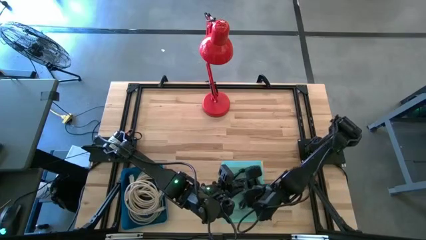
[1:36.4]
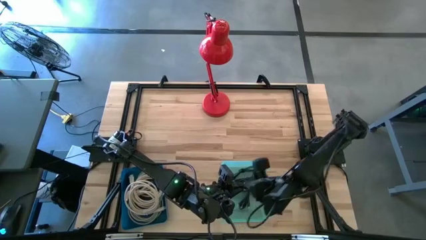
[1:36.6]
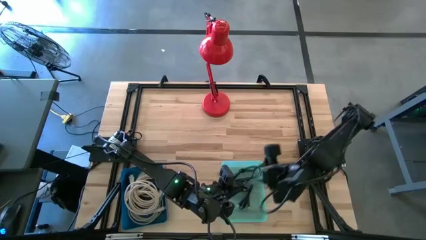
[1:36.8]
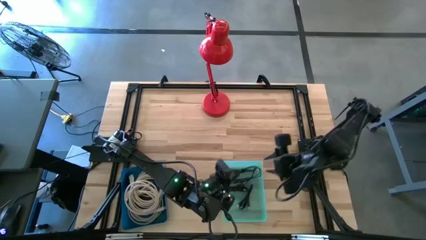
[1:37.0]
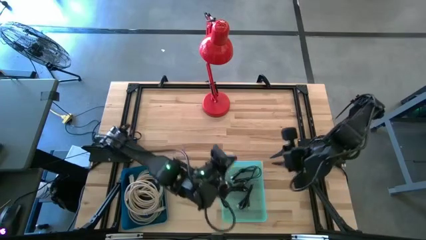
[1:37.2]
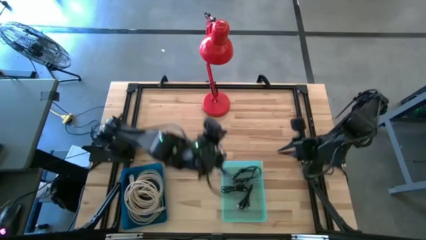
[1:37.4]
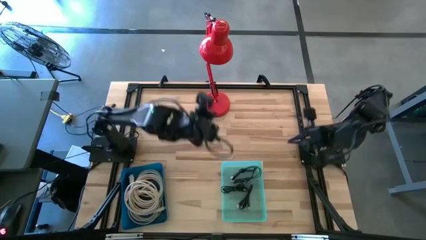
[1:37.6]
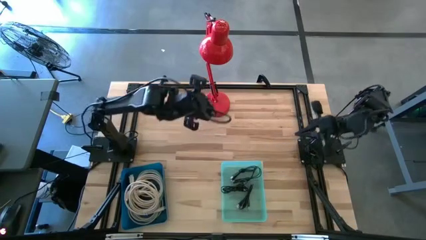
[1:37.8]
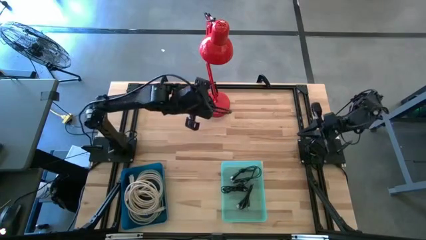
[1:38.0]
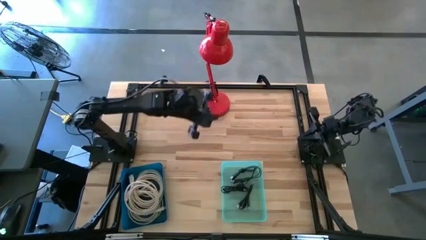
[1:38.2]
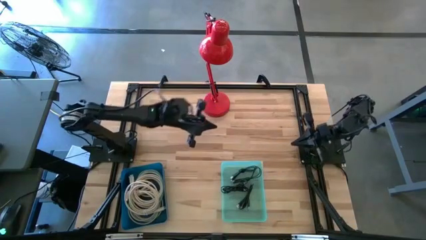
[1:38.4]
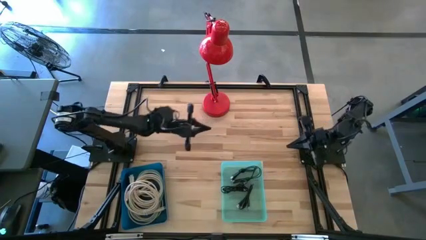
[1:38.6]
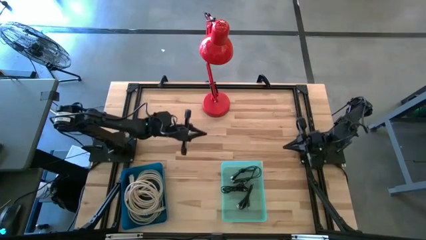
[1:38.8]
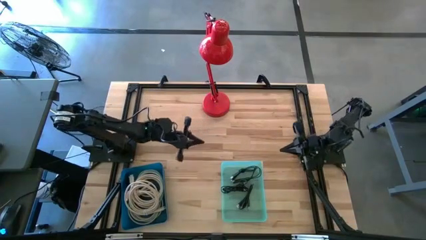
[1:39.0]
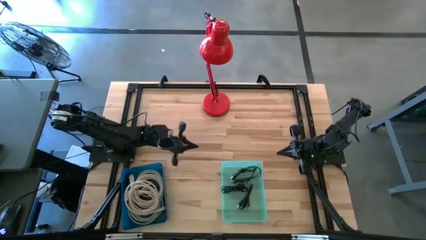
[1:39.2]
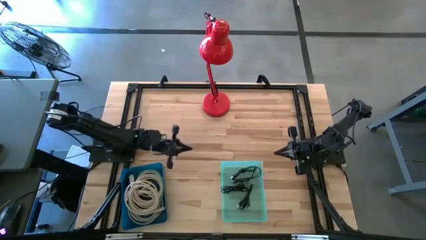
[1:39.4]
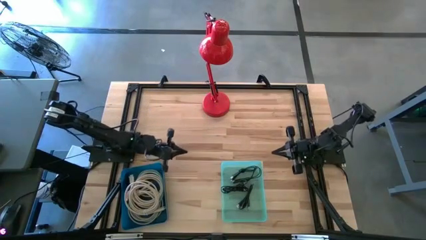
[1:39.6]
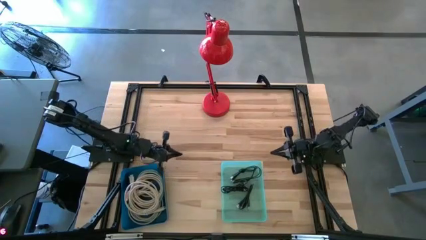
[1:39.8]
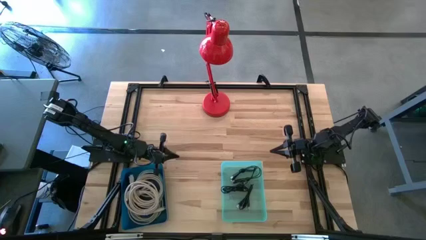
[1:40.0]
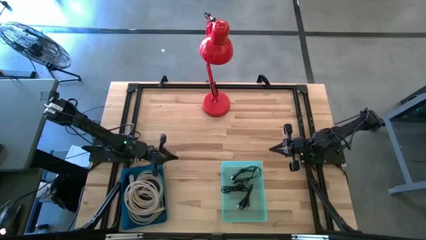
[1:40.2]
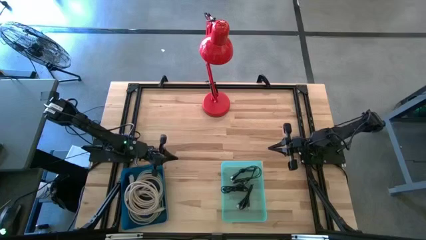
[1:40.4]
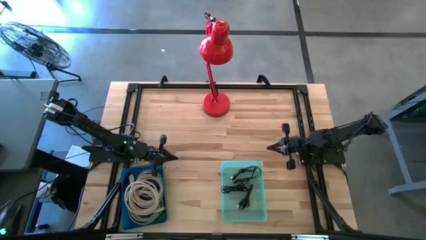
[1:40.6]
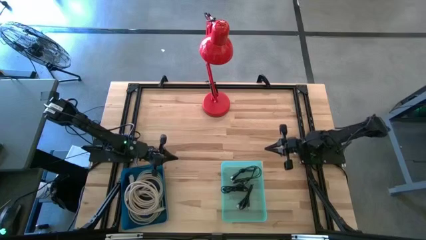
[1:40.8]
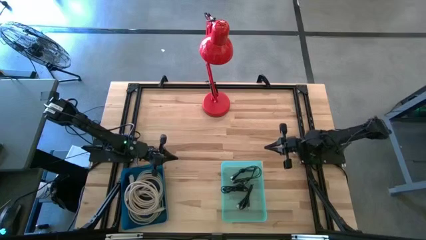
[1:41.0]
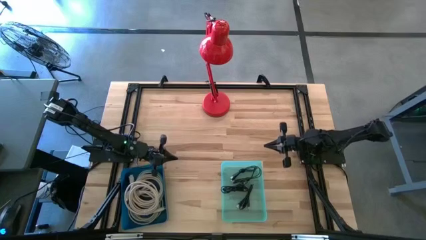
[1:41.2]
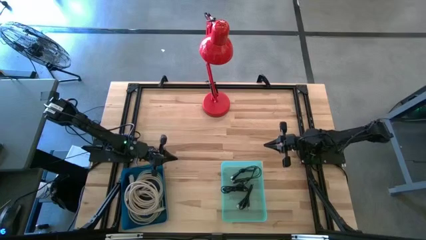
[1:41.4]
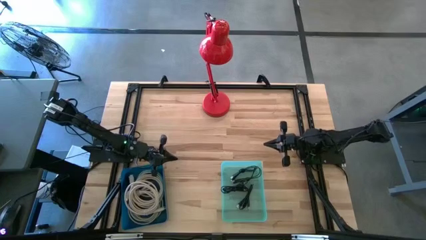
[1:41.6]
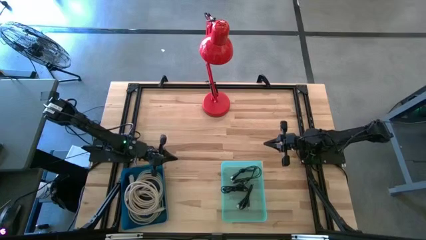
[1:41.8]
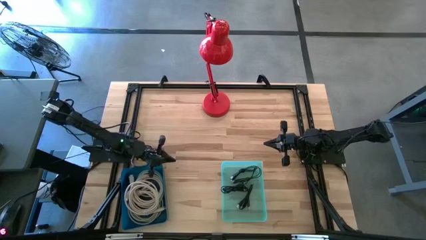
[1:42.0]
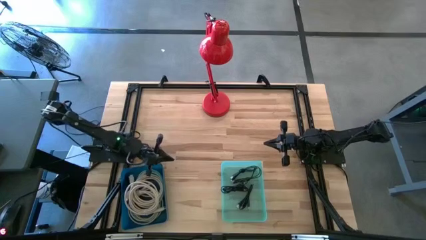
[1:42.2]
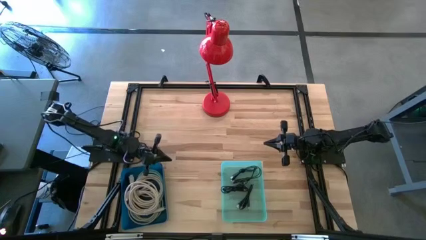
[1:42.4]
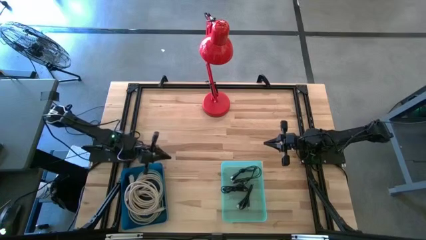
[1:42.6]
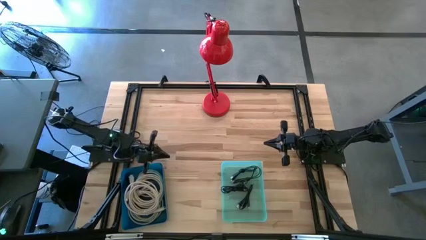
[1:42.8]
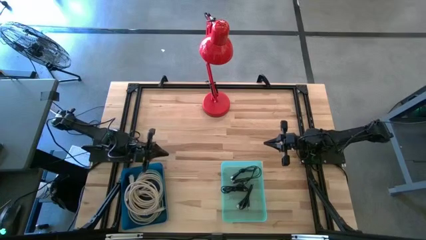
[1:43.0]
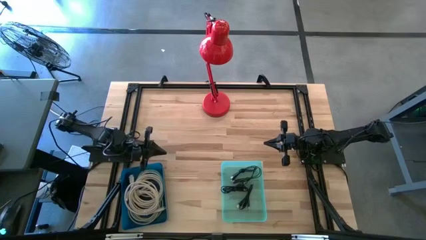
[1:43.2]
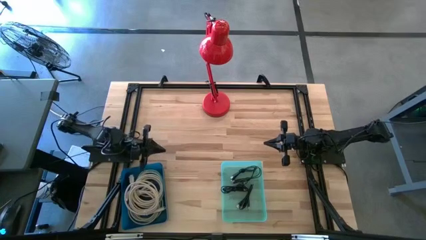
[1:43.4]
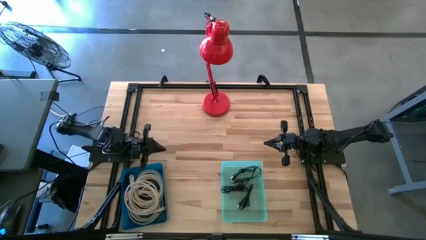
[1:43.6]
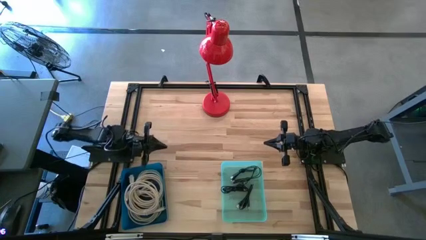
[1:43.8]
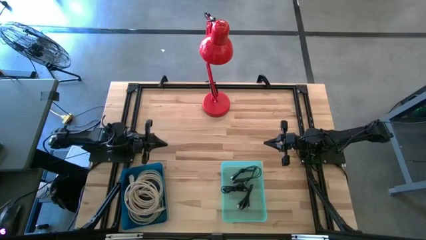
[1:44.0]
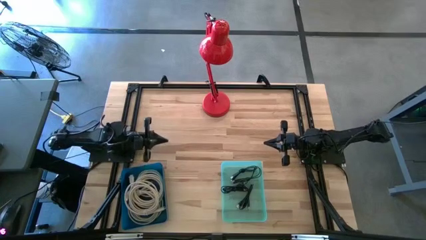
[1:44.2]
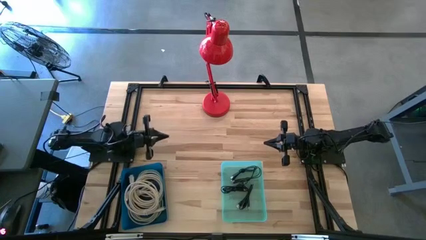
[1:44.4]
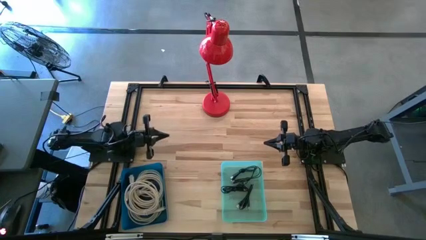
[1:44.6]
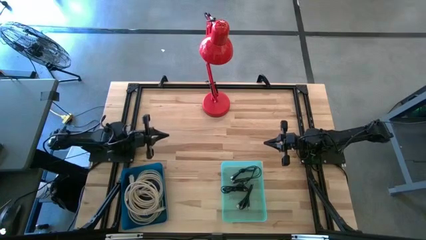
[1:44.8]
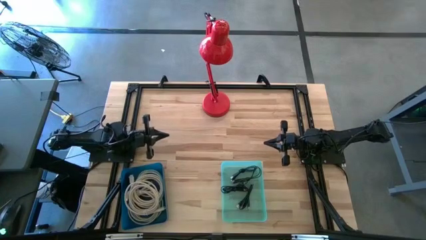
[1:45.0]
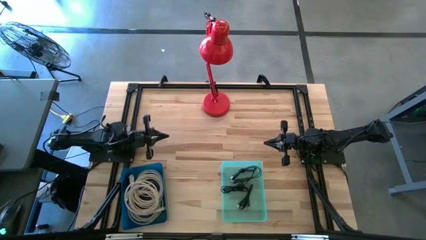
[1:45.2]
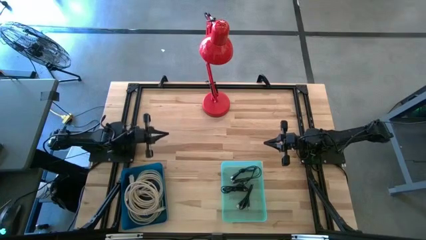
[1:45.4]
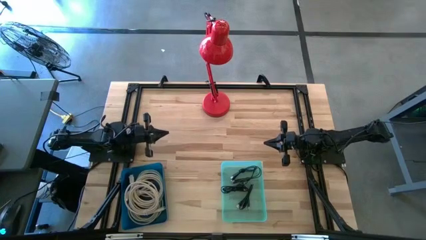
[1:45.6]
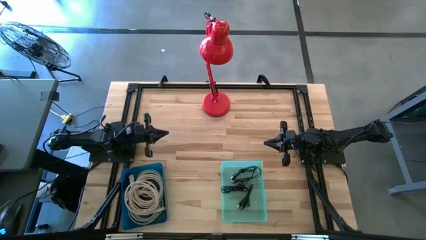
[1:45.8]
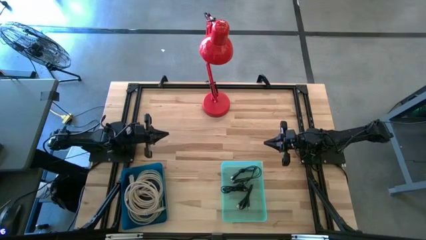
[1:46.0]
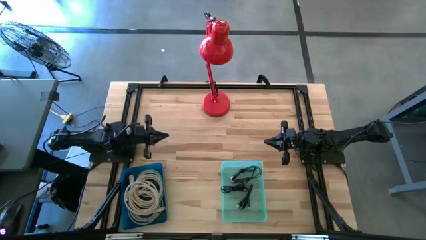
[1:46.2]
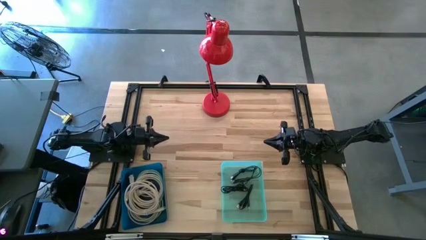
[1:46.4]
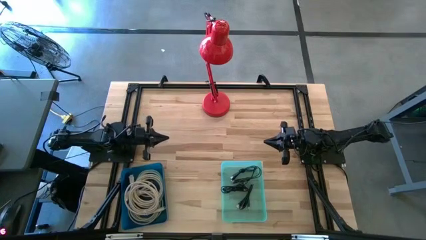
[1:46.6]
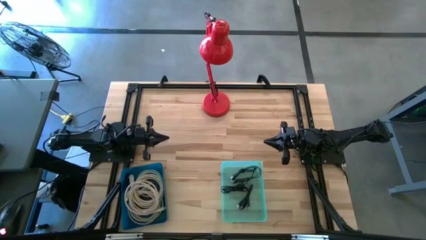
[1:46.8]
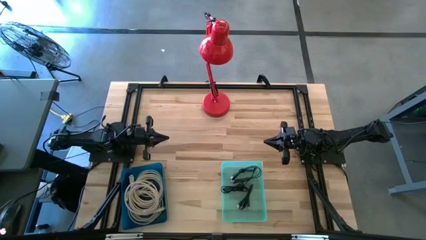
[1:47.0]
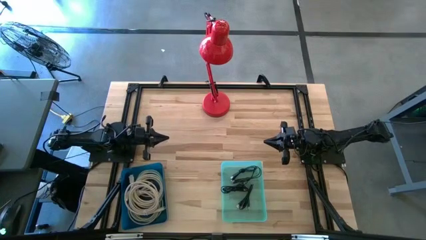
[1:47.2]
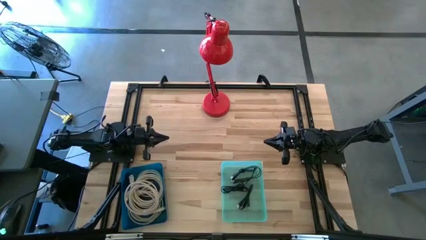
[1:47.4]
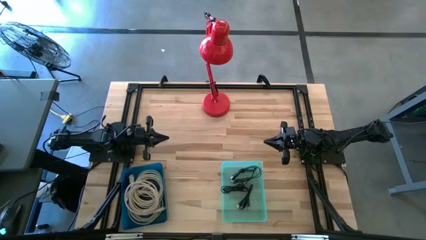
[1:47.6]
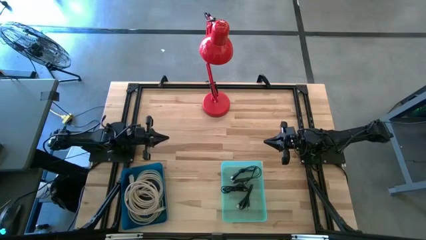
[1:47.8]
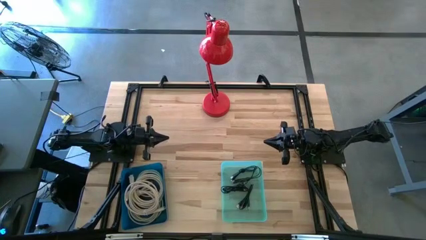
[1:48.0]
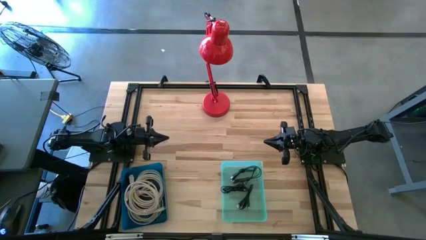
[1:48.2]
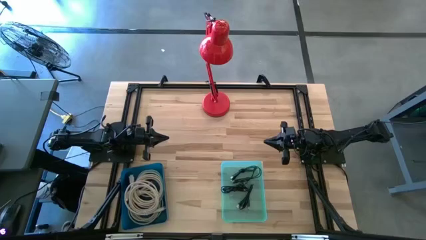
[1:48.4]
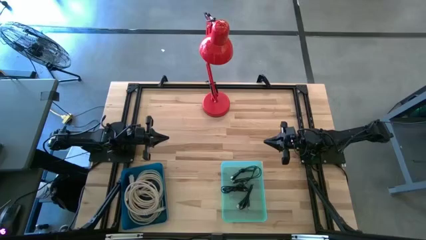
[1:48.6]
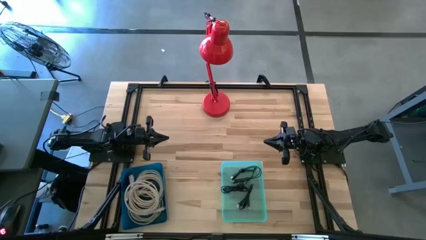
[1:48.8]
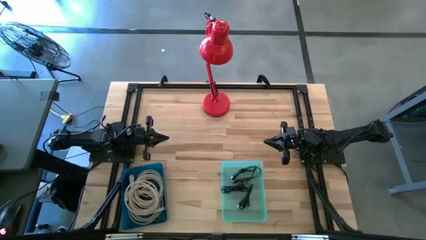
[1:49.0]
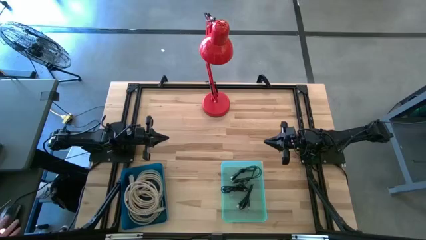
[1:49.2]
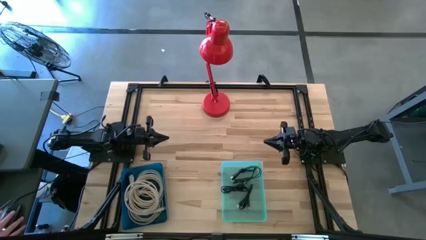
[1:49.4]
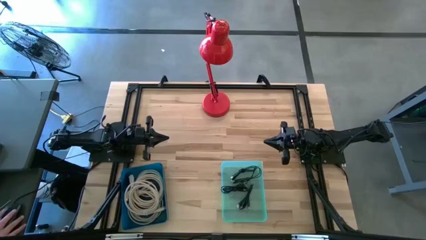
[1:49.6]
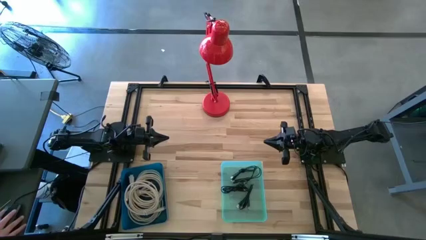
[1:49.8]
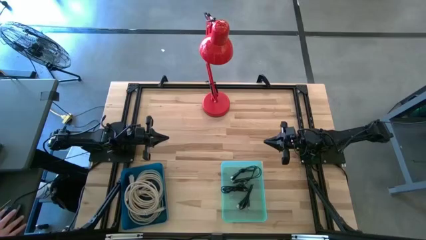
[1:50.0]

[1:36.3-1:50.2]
Task: Pick & Place USB Port
Return to Home Position

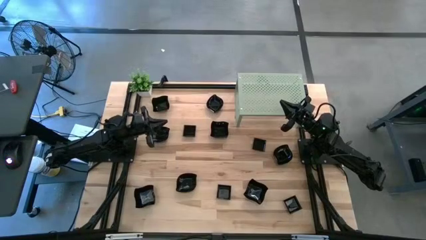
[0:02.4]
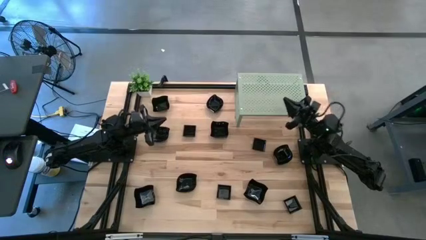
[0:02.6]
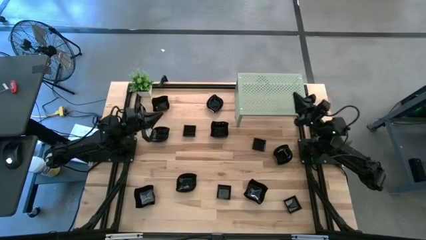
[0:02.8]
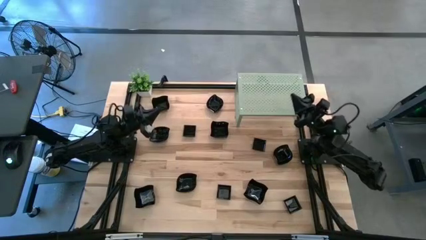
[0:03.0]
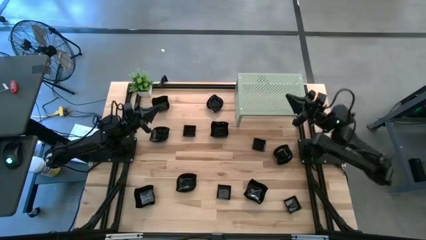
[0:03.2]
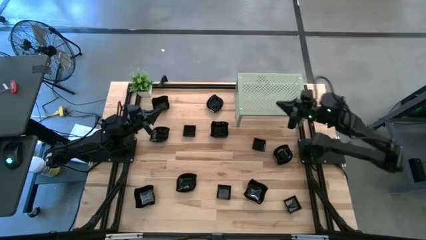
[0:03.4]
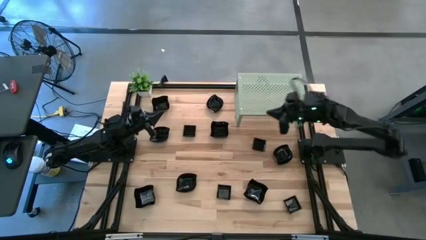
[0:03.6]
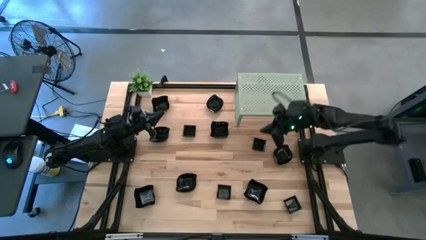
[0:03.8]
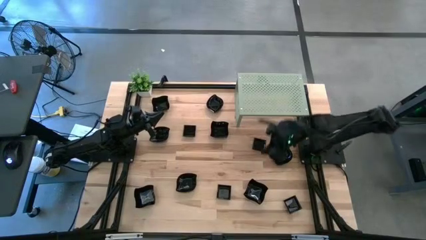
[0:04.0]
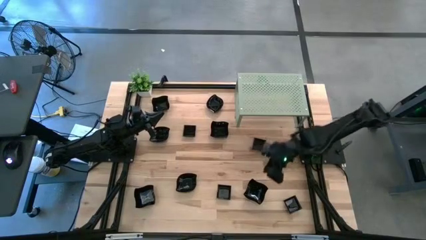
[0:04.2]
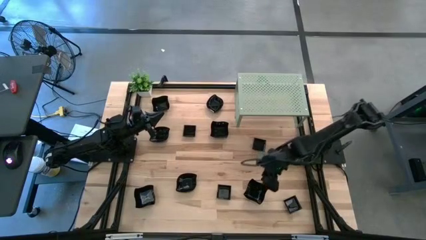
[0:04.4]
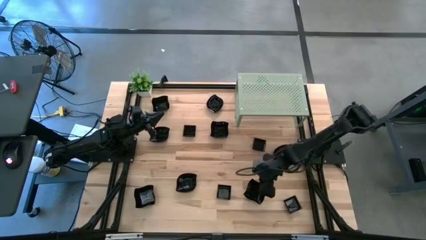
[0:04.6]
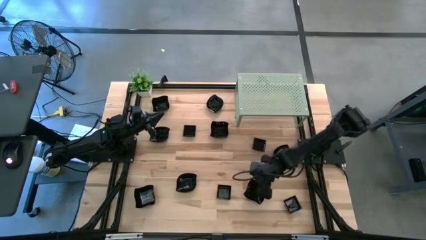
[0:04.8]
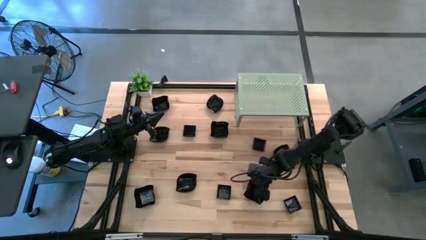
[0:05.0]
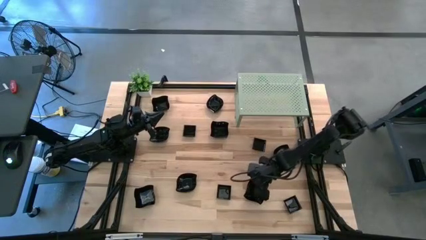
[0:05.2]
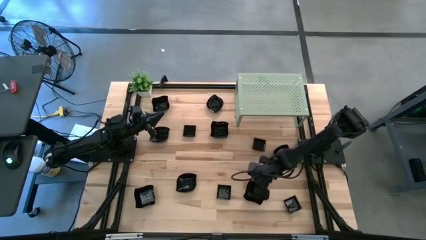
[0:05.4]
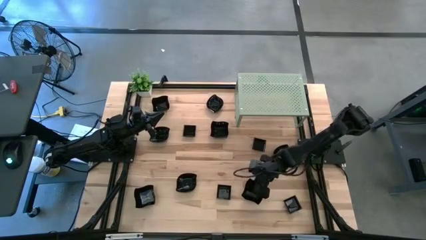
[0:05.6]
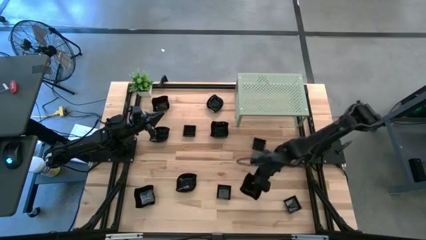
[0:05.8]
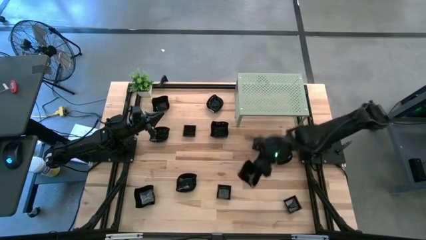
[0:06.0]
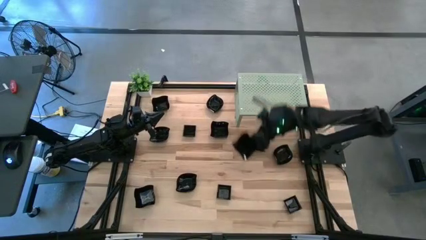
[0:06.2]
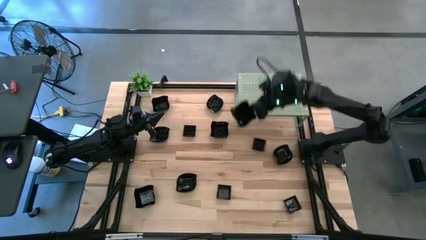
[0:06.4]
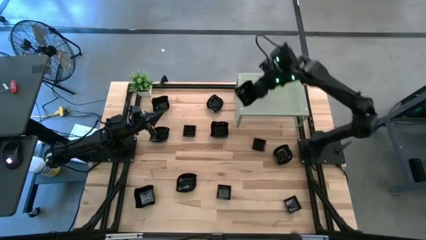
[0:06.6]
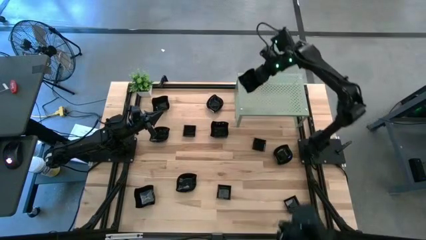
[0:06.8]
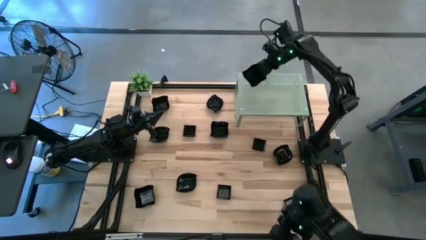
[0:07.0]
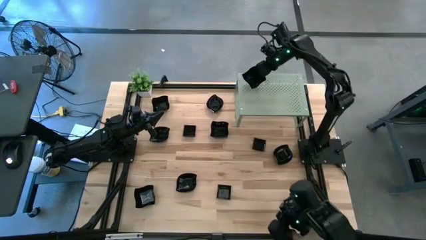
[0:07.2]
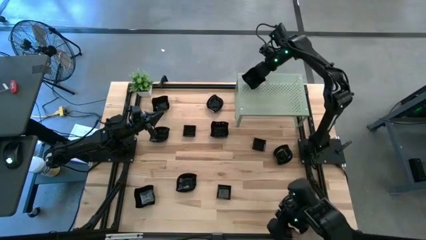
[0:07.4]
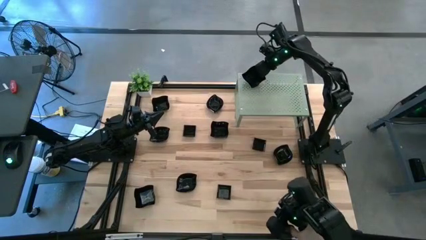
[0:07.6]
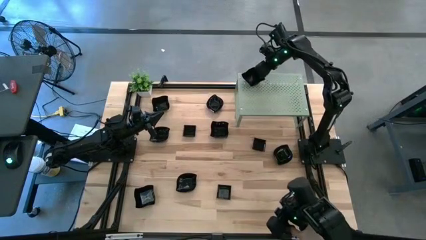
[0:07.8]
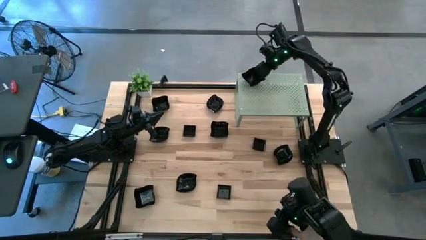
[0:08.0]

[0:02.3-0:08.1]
Task: Pick & Place Mini shaped plates
Put the distorted square plate on the shelf
